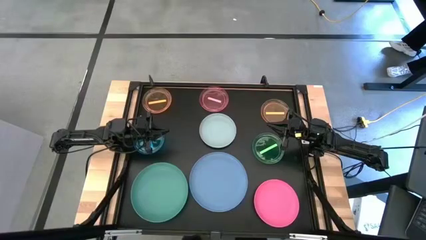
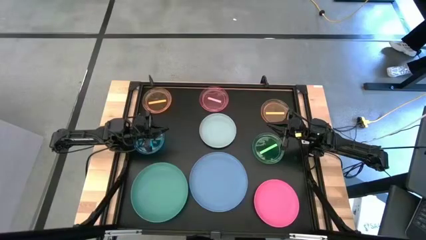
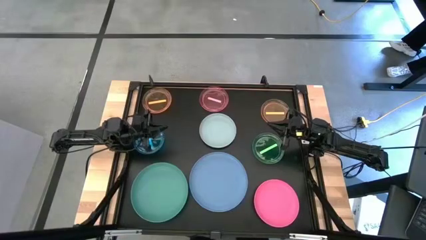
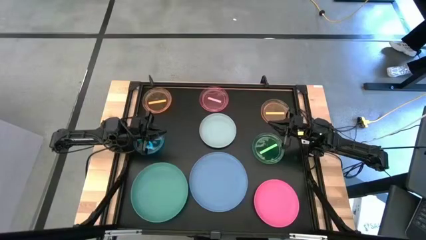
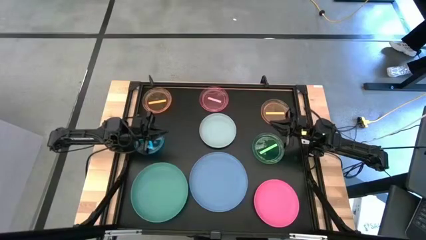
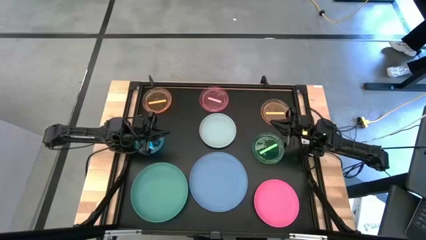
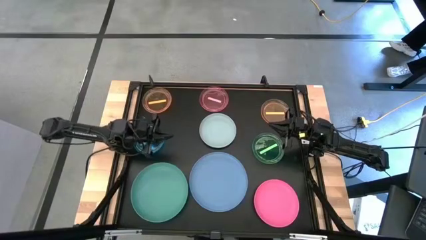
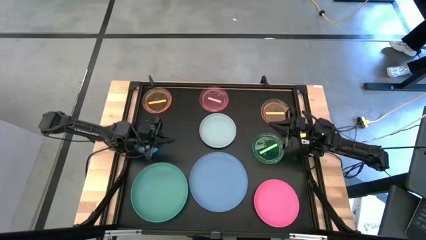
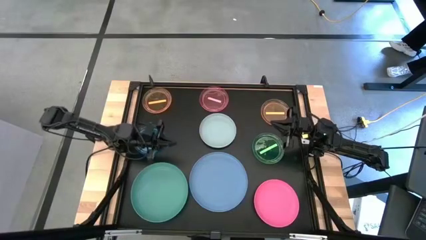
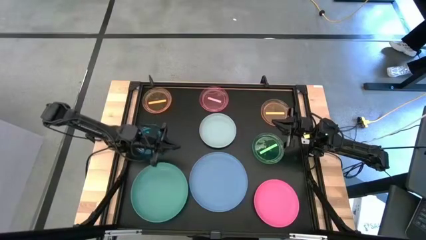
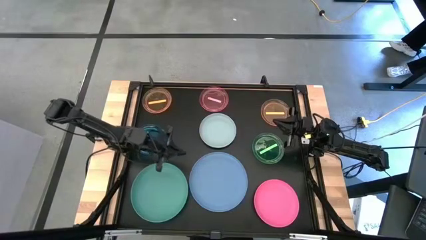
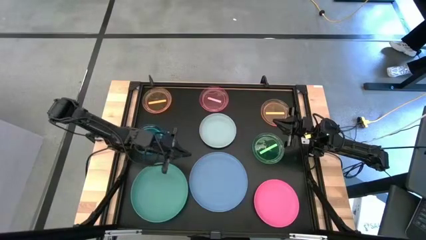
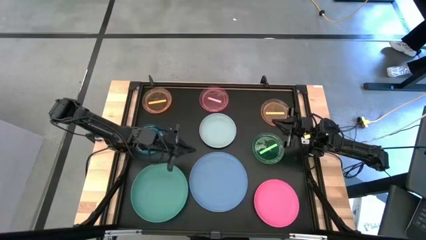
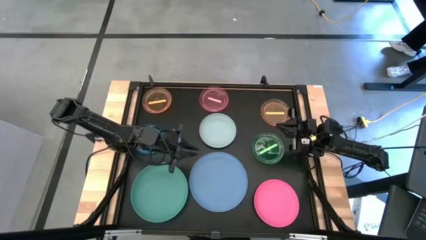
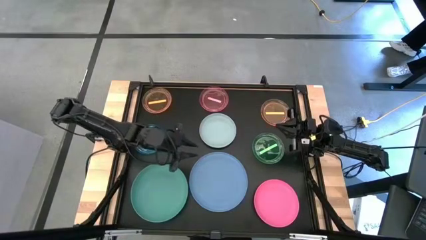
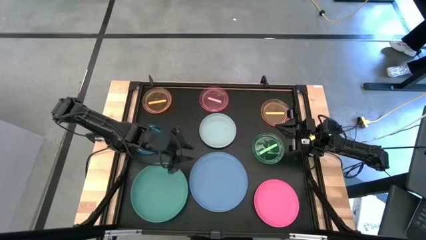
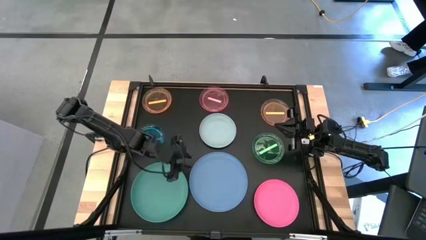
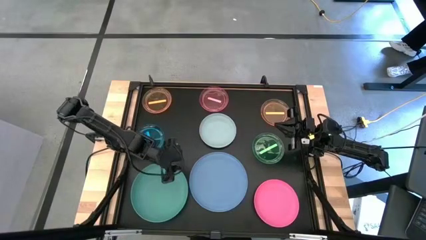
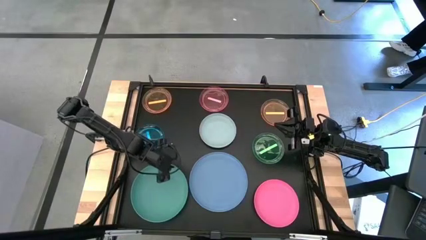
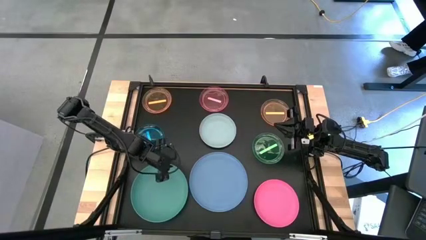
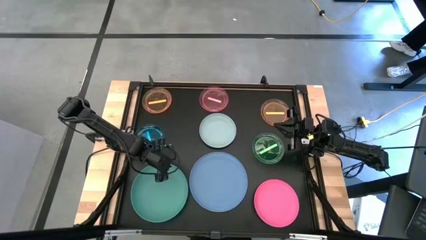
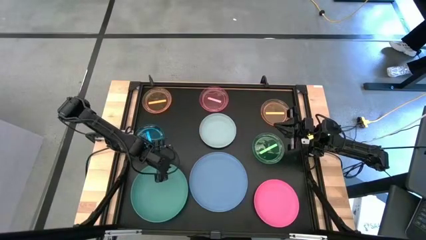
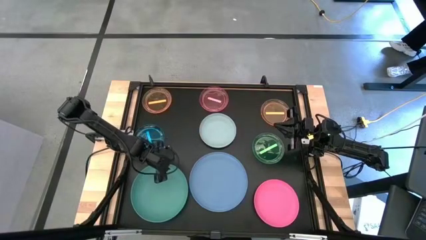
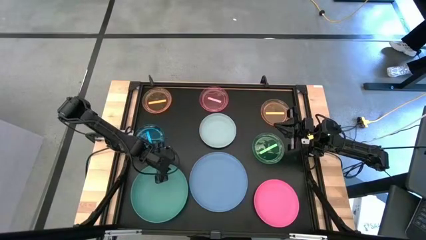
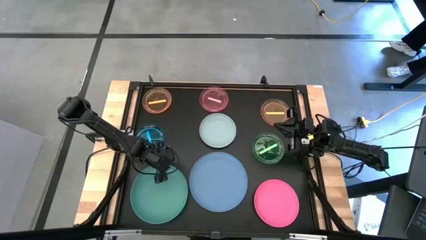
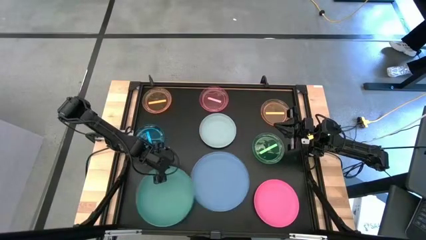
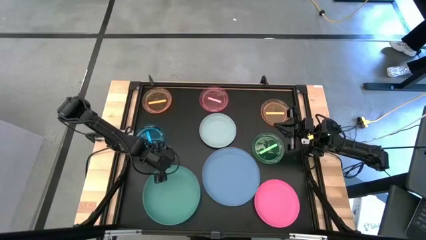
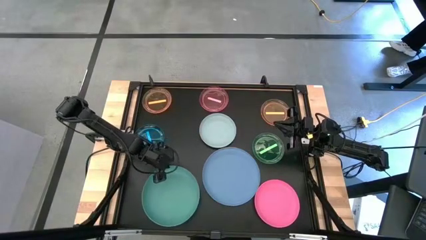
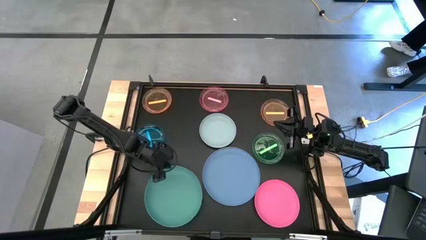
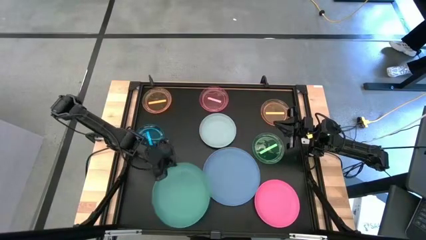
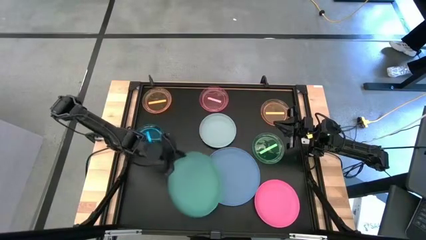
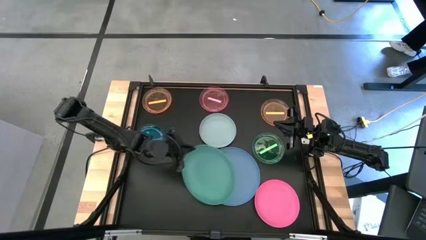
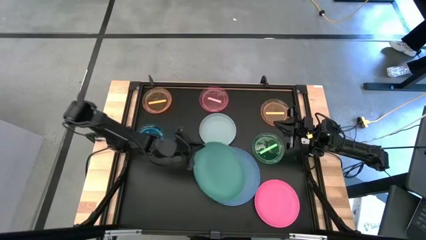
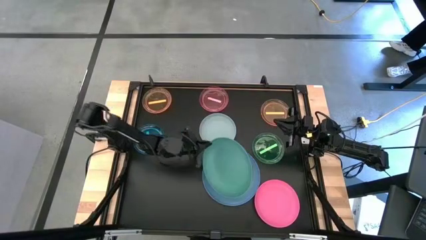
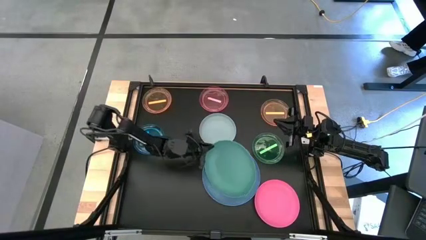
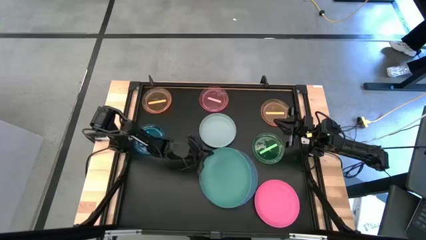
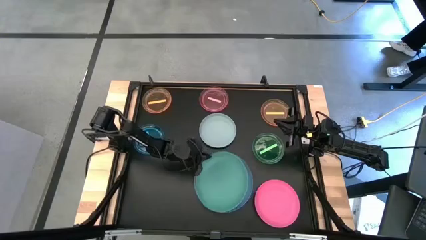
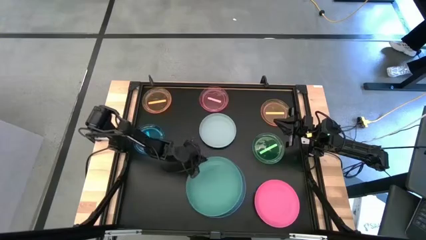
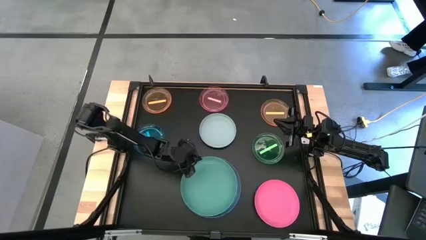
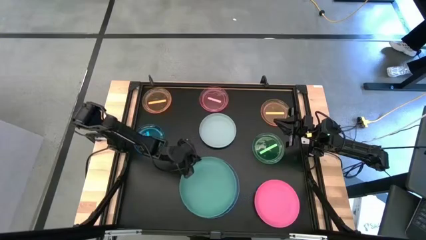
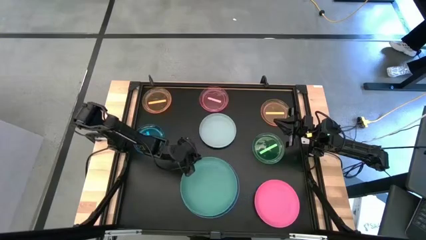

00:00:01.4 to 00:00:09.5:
Task: Stack plastic plates
Stack the green plate on top of the blue plate

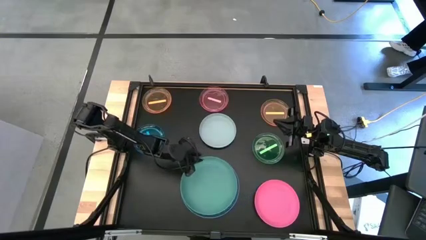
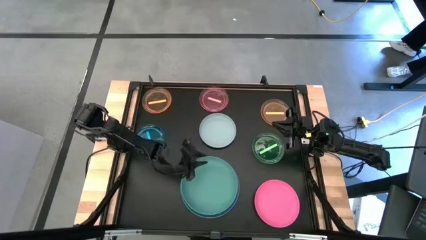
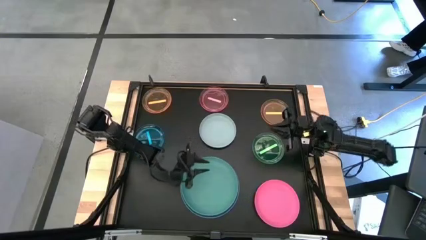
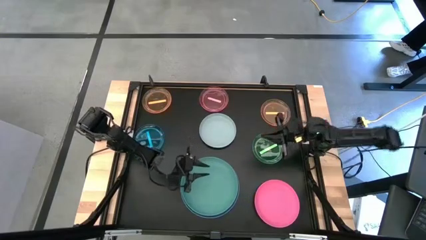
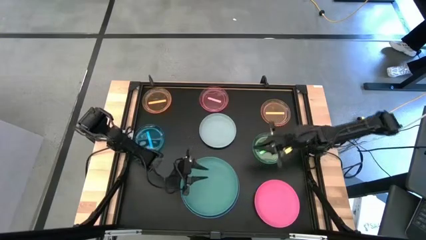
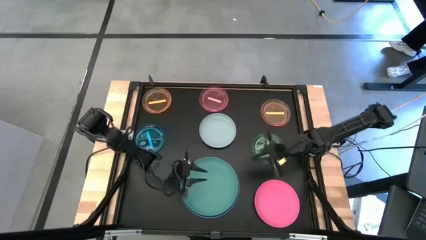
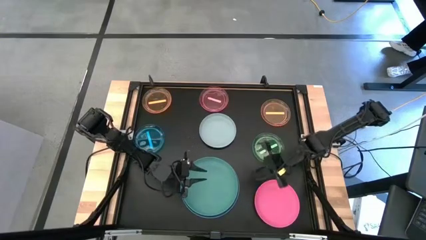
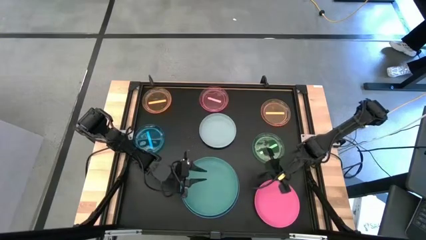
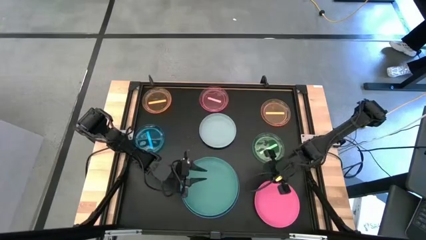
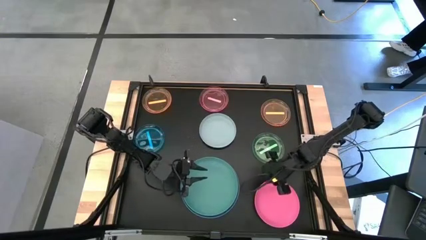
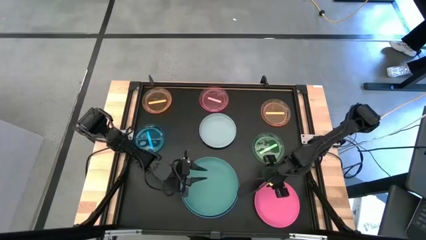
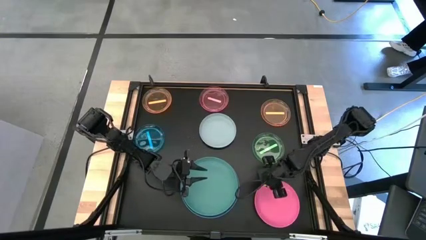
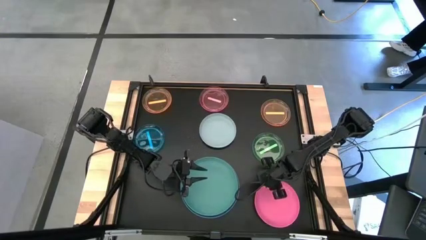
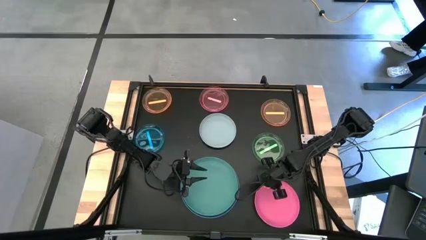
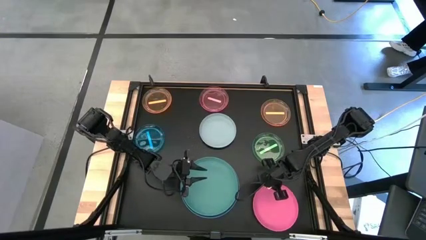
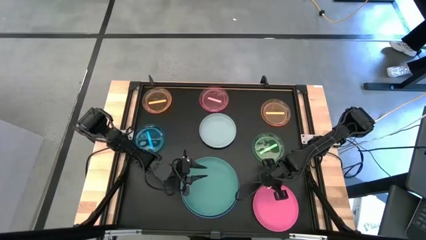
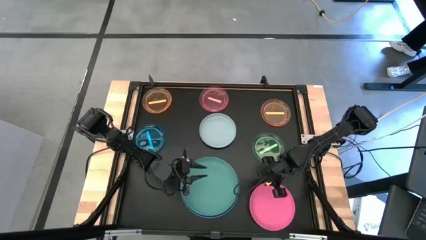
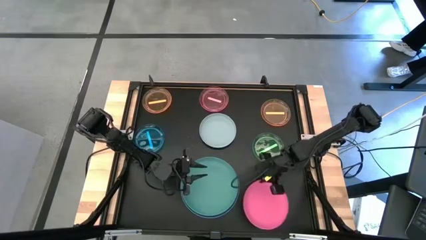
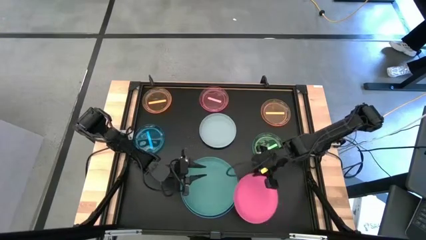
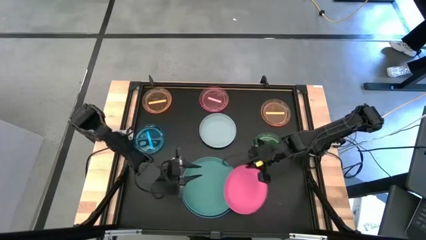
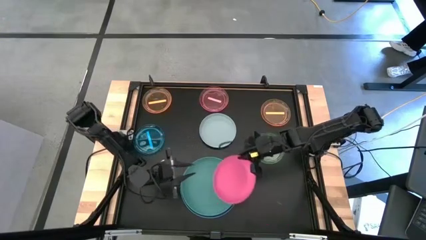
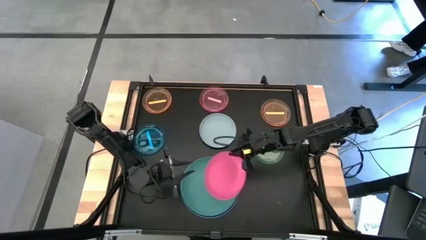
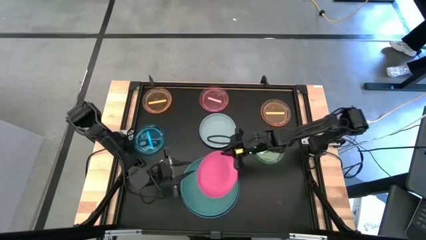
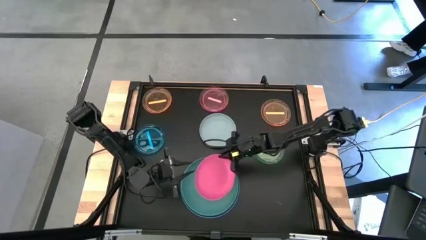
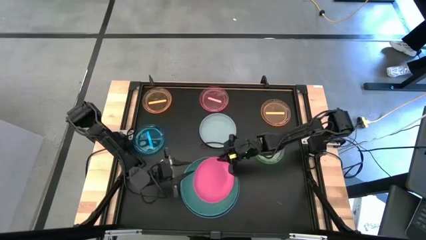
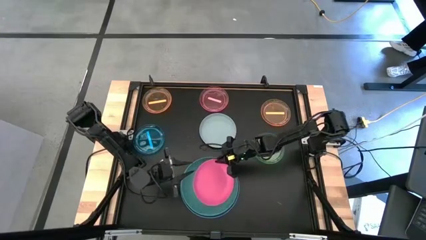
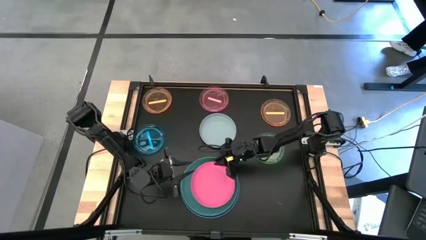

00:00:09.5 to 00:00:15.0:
Stack the pink plate on top of the green plate

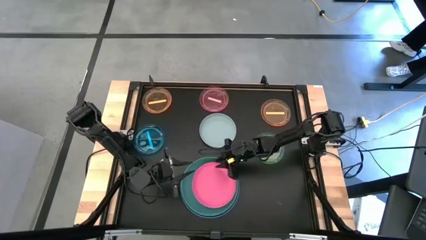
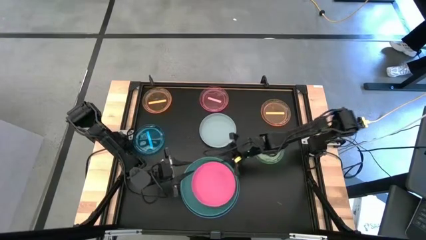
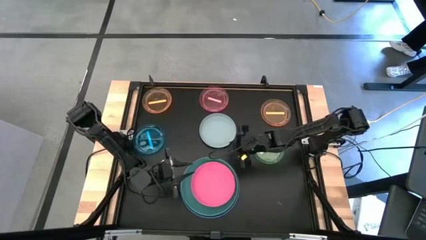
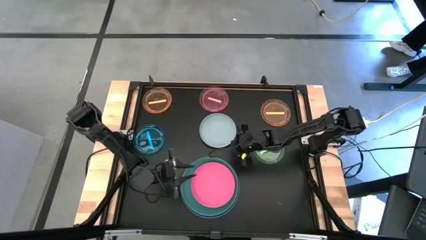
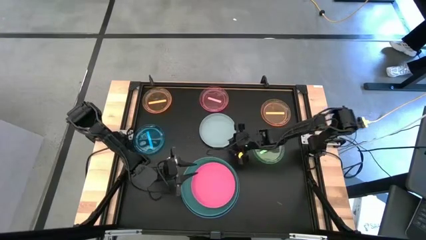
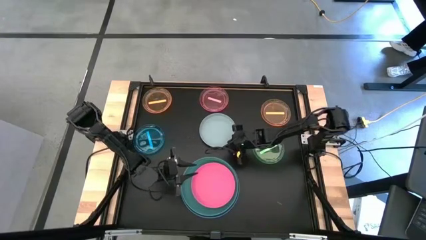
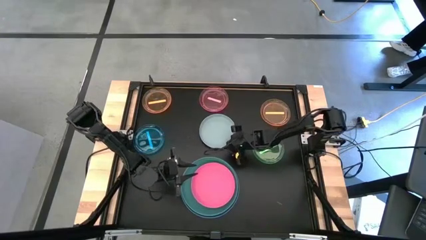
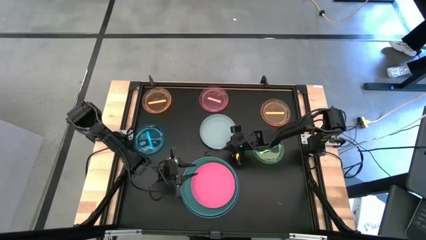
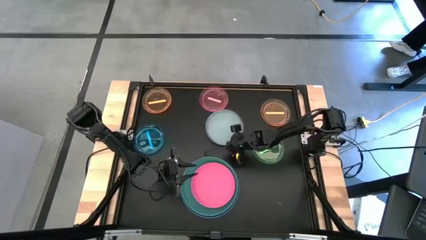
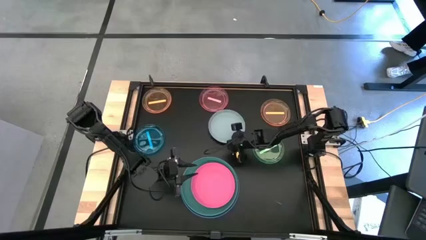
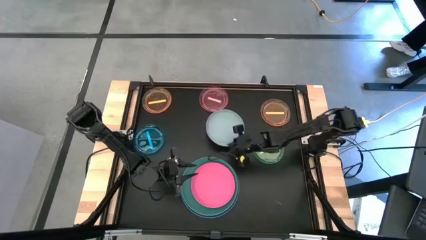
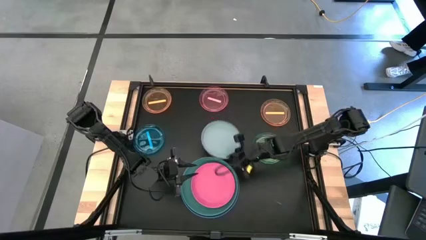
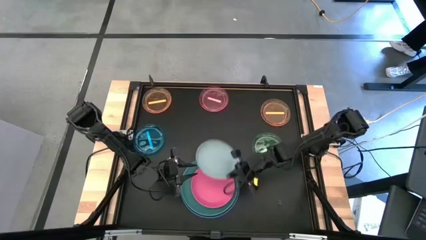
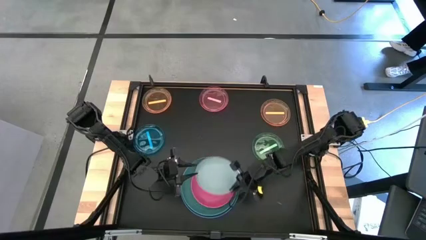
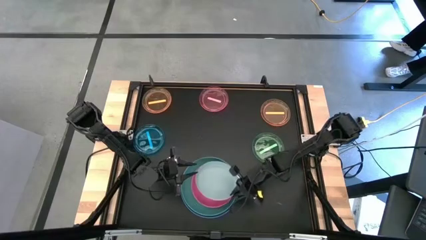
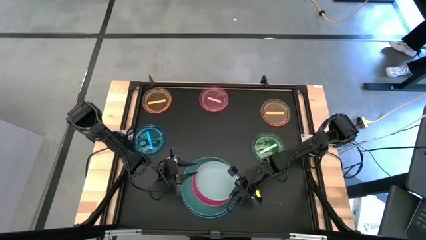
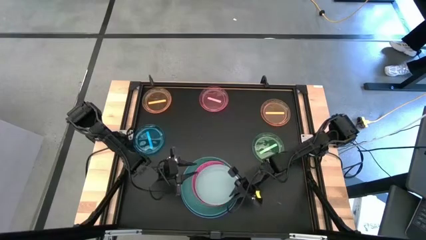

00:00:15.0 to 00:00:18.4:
Stack the large light blue plate on top of the pink plate
